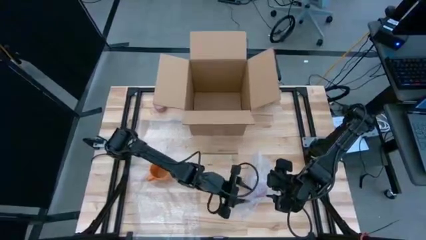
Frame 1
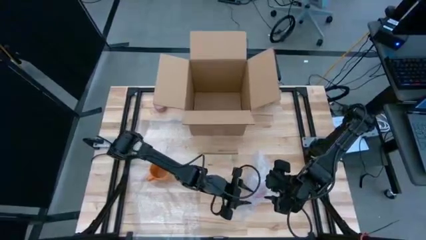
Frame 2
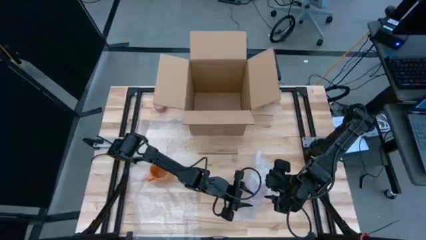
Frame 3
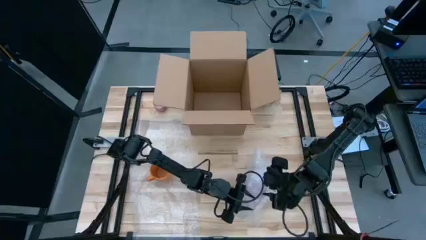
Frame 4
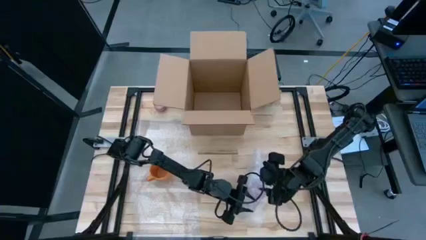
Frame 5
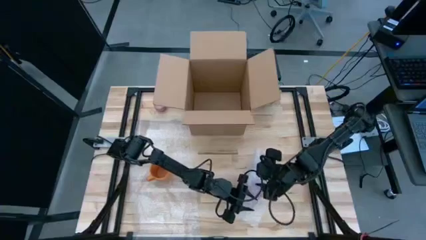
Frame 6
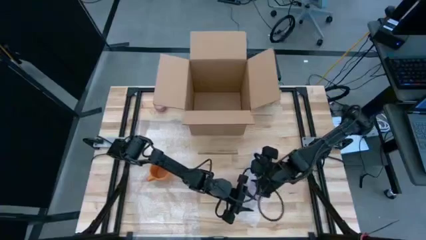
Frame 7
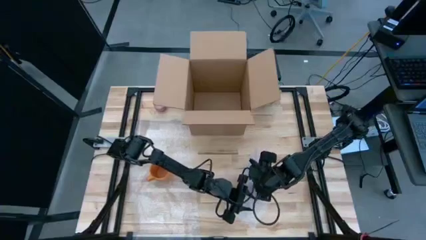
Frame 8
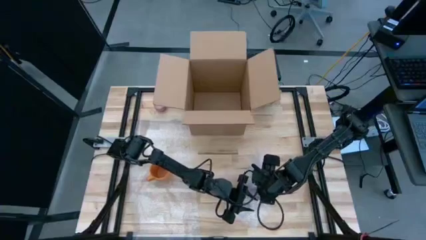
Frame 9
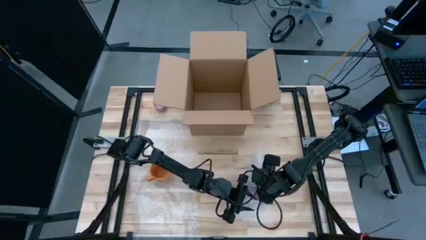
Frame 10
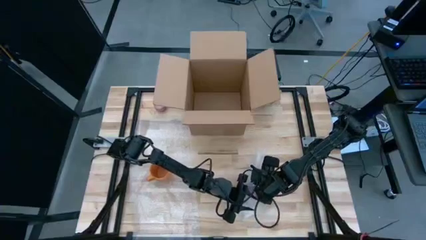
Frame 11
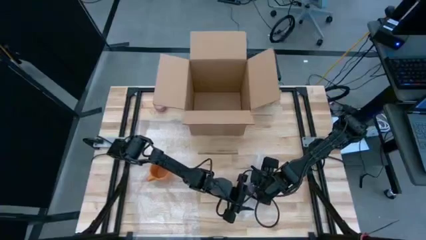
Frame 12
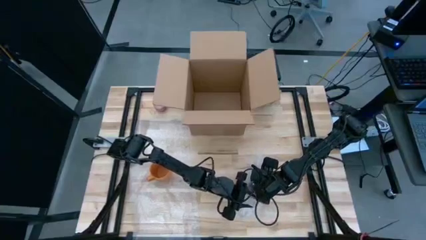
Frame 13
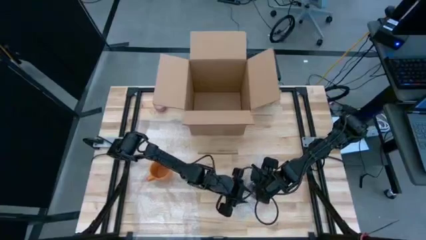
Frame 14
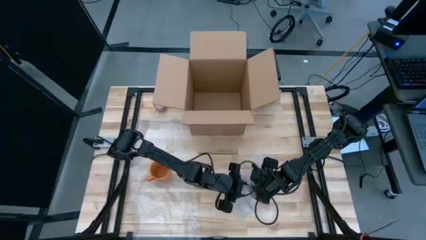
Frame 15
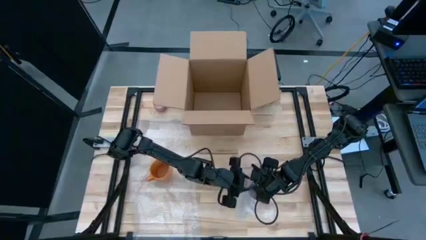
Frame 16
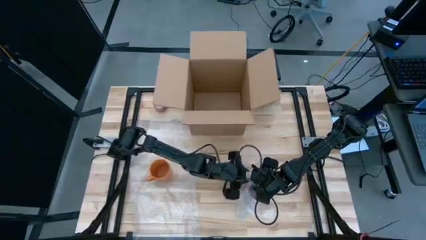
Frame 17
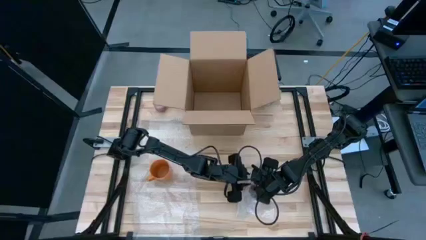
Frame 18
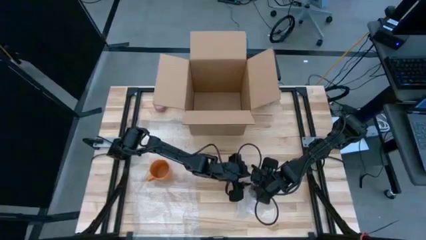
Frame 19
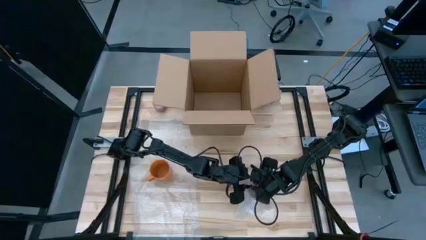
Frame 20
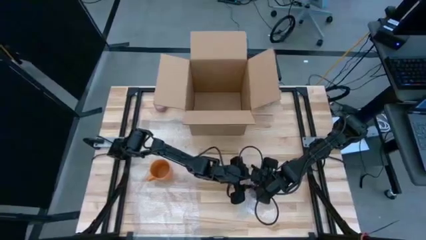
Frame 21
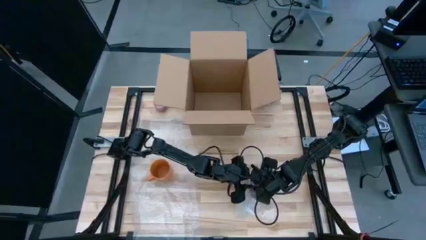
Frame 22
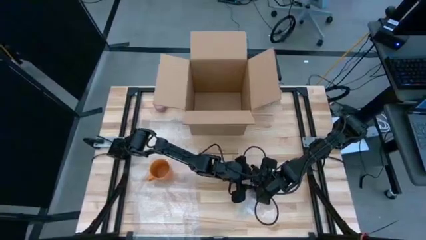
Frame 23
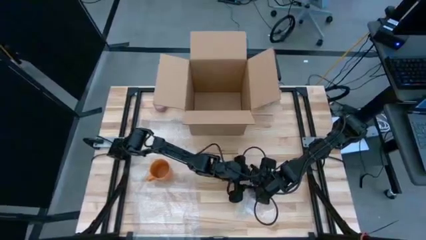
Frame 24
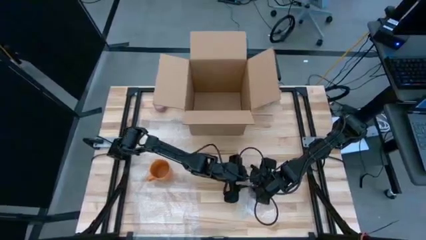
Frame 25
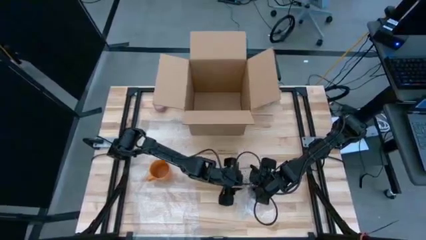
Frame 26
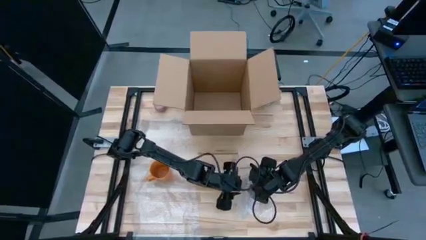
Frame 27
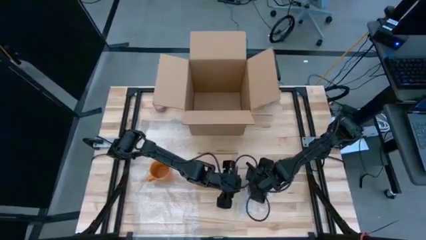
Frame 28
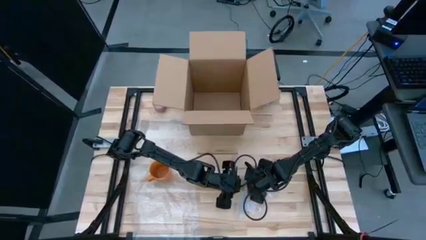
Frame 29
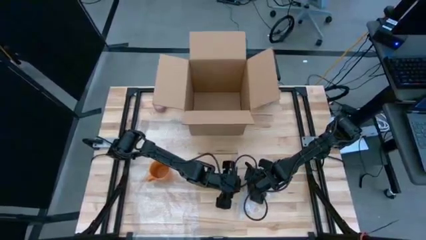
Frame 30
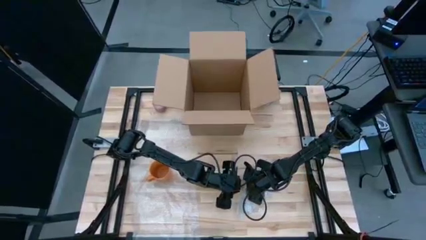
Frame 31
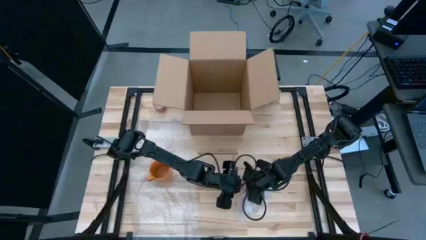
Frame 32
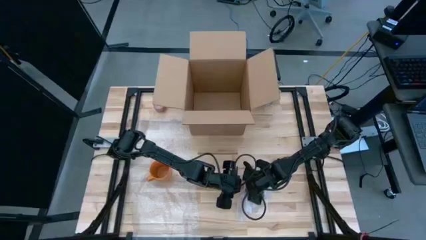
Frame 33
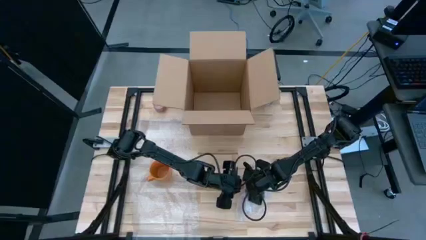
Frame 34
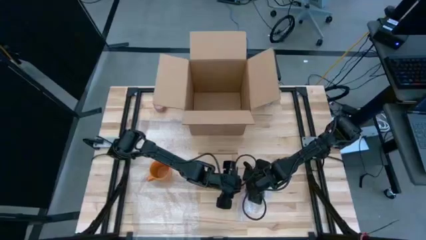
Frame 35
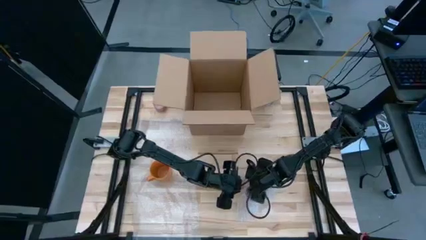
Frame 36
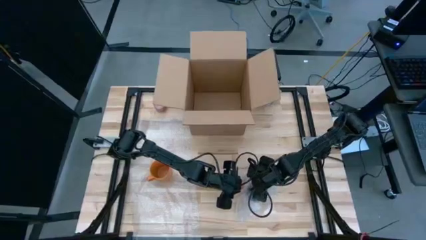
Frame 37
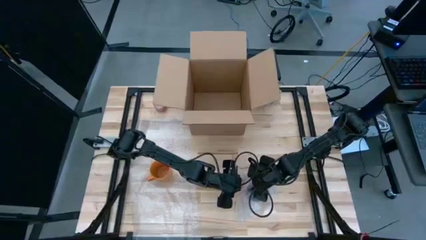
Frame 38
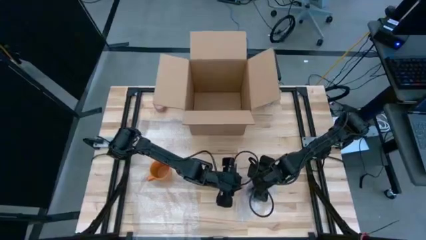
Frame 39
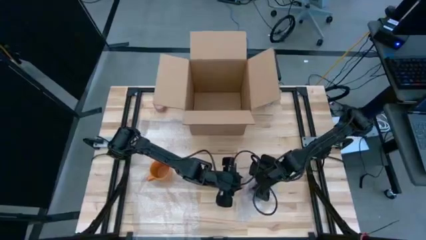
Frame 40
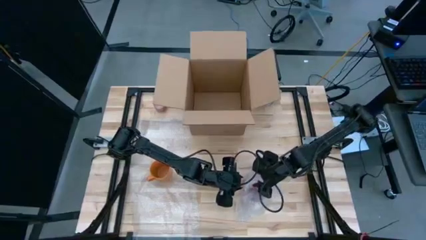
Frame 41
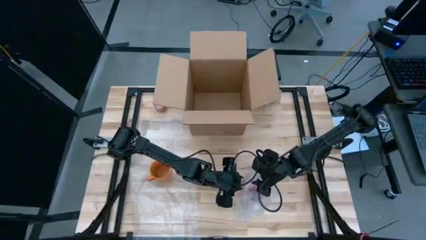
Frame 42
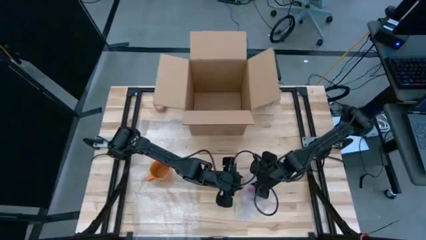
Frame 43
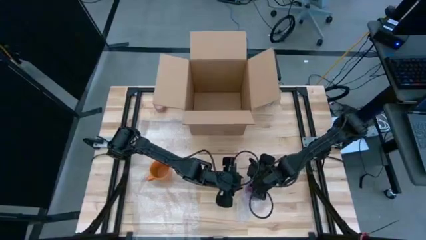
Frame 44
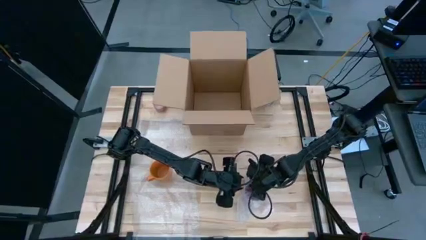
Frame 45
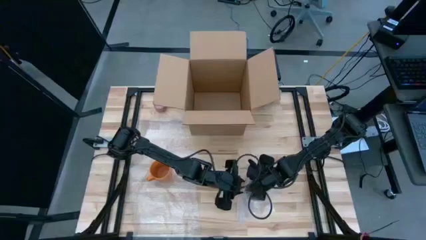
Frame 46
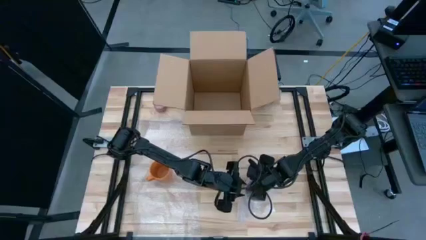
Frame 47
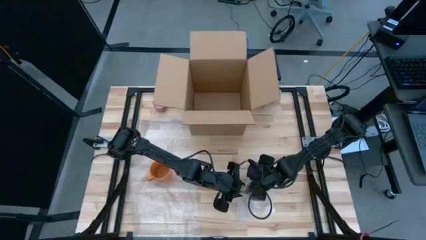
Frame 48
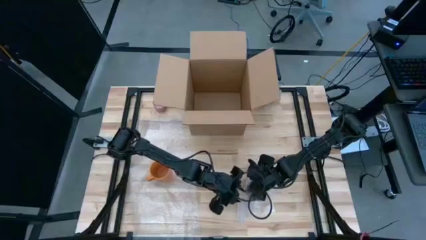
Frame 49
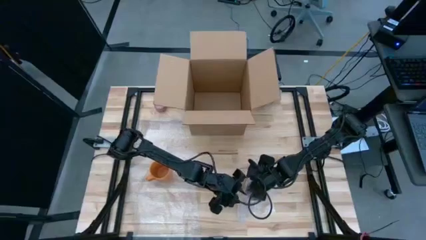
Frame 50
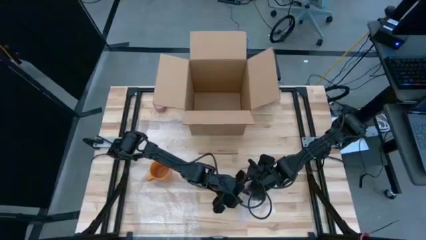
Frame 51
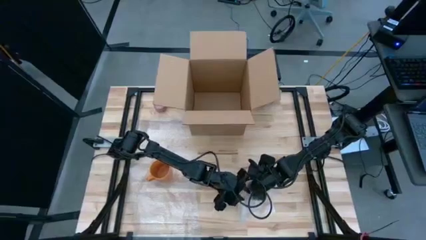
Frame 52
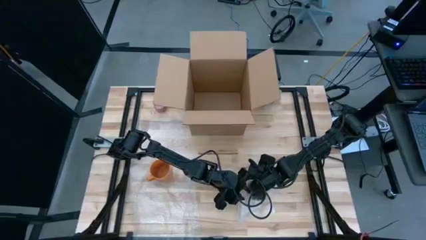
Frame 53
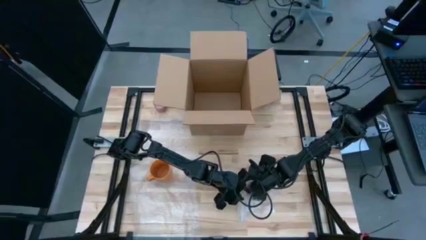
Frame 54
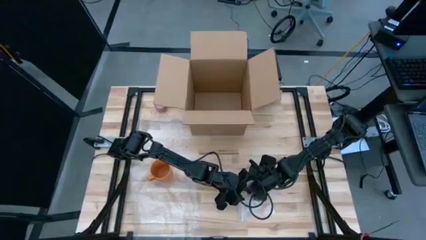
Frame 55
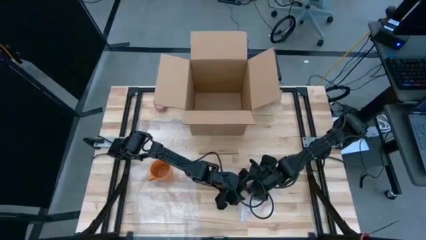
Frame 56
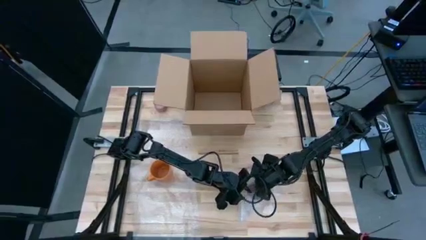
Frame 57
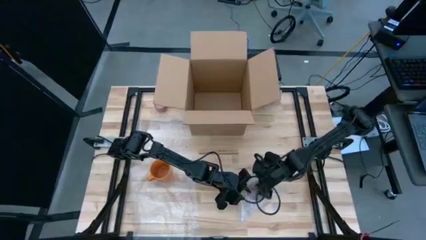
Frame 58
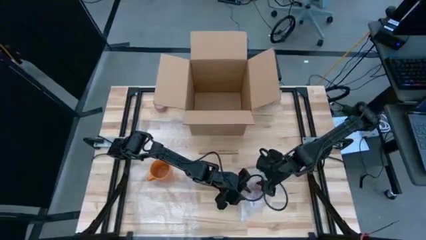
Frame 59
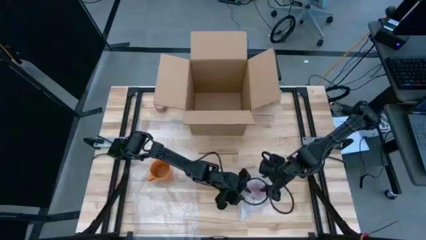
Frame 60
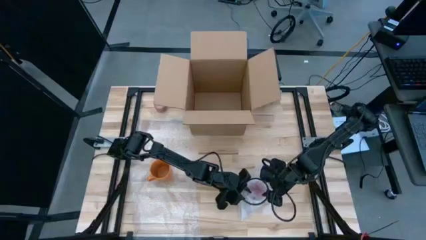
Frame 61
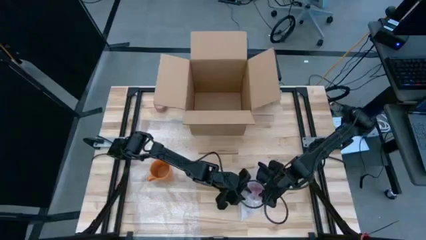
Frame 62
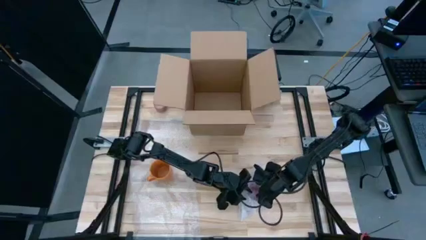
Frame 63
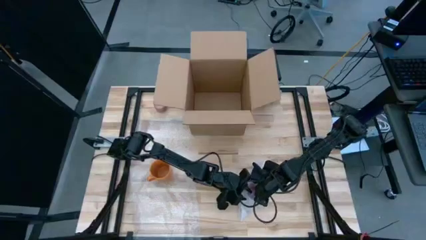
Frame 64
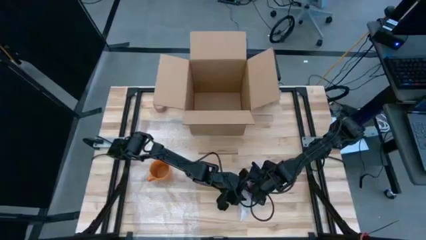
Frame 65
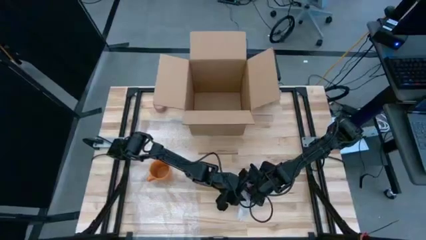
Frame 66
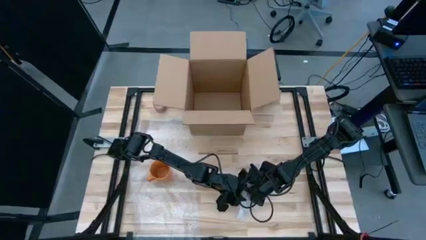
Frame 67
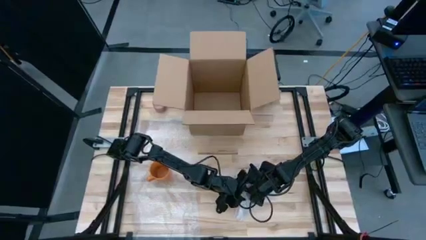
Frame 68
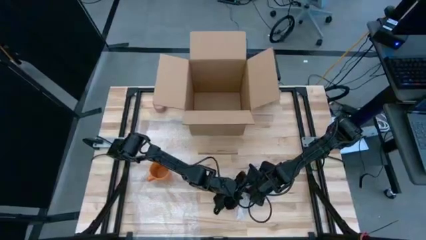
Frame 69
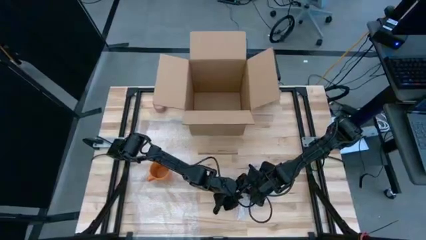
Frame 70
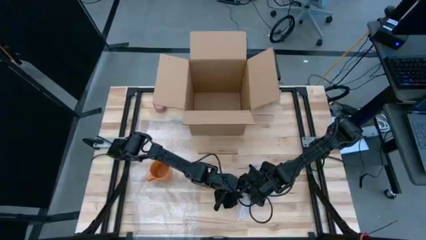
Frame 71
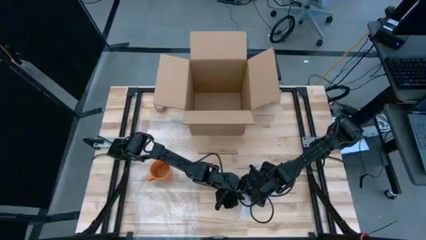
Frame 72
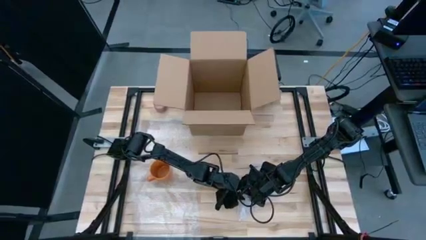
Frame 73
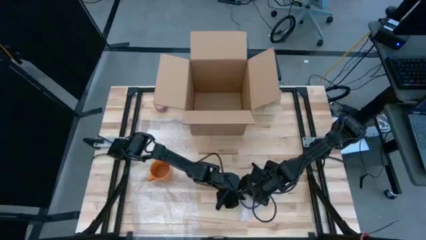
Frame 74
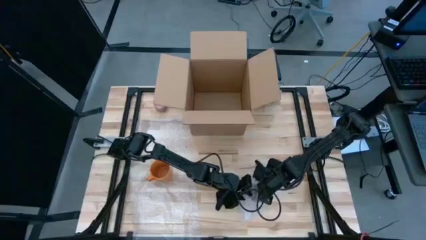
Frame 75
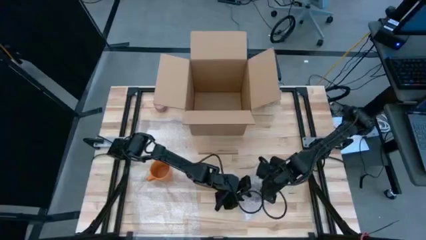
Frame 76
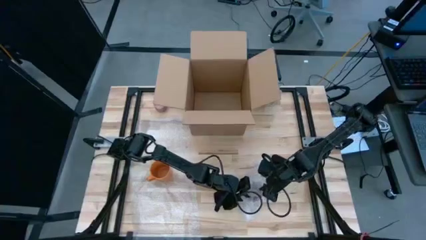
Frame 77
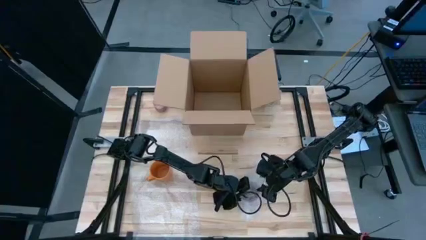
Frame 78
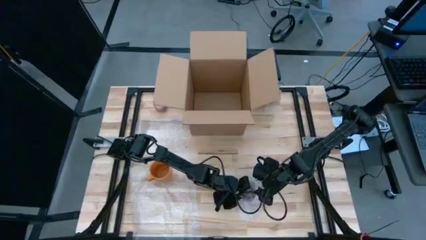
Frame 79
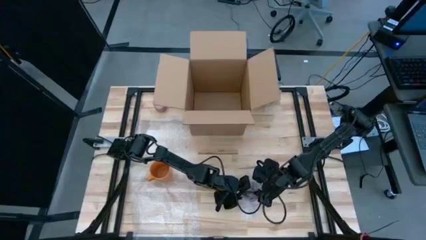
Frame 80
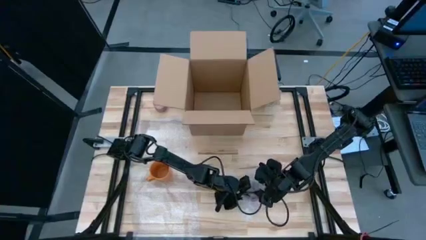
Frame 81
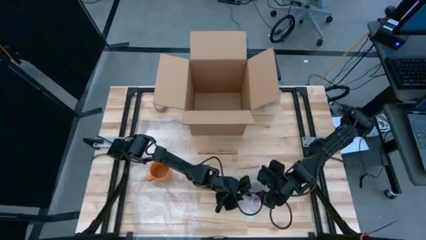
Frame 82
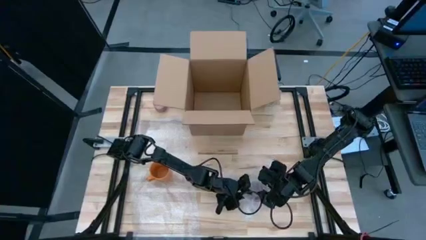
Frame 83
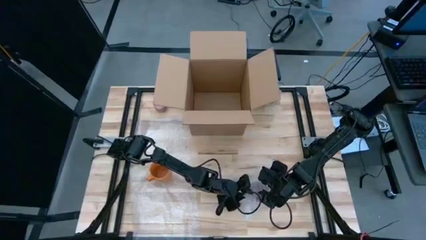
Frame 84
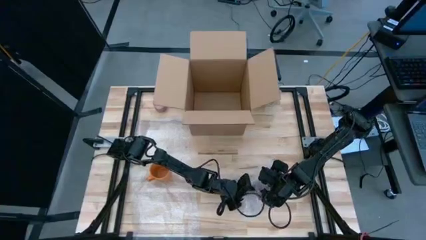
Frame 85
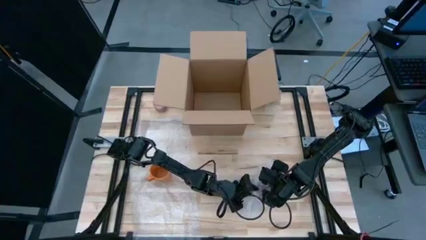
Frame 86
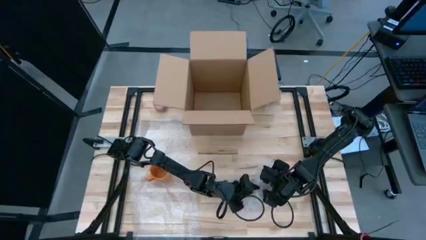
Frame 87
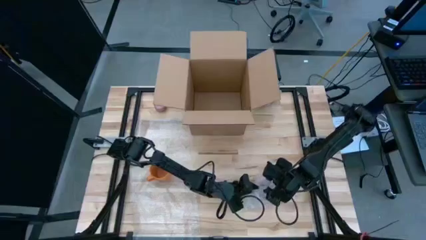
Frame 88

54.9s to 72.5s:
Task: wrap mug
Wrap the pink cup with bubble wrap
